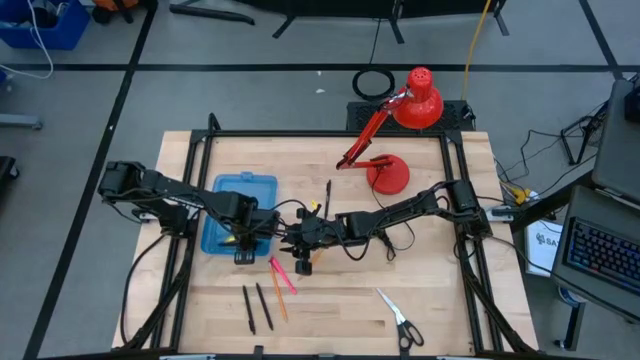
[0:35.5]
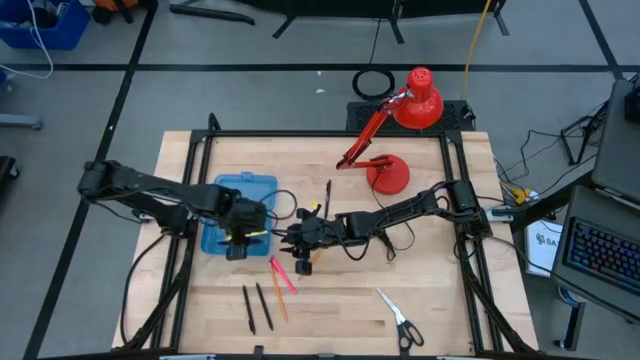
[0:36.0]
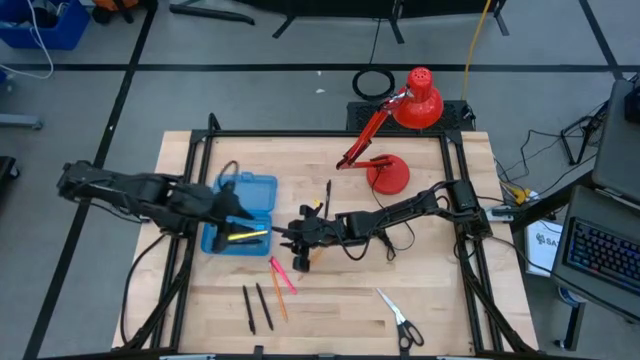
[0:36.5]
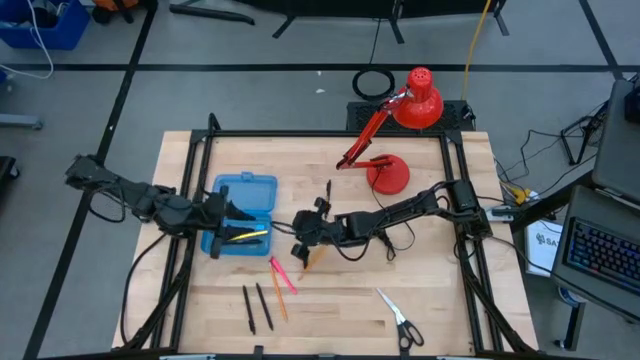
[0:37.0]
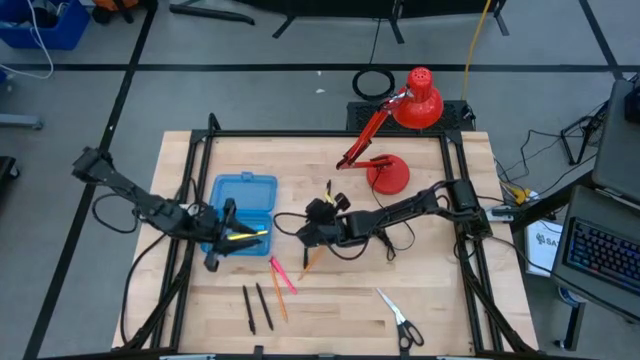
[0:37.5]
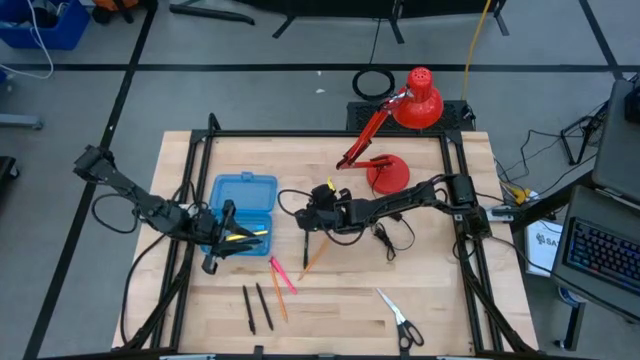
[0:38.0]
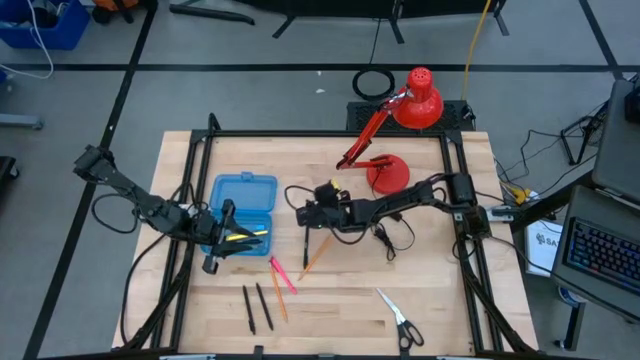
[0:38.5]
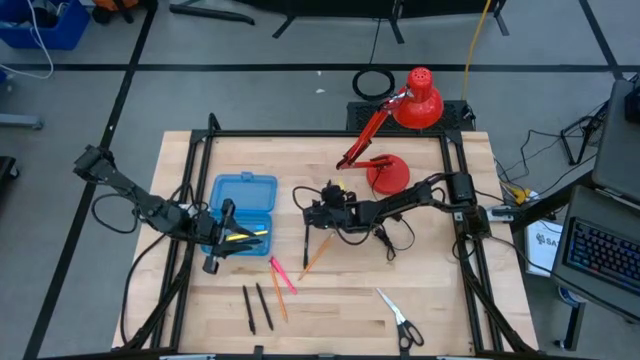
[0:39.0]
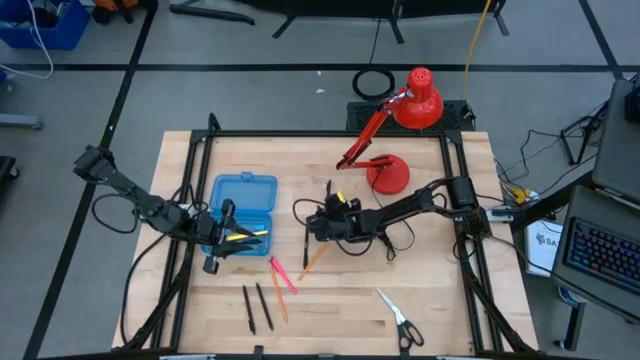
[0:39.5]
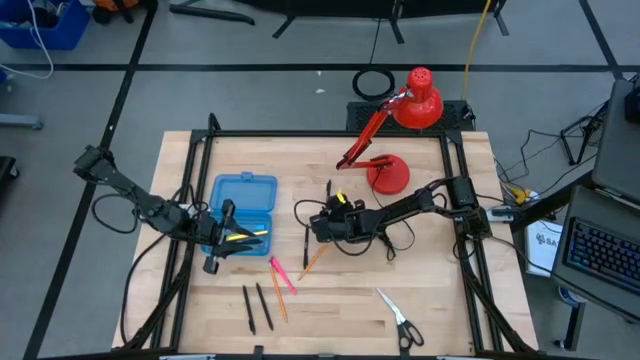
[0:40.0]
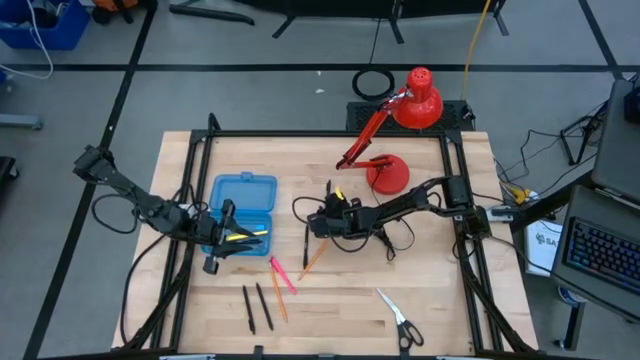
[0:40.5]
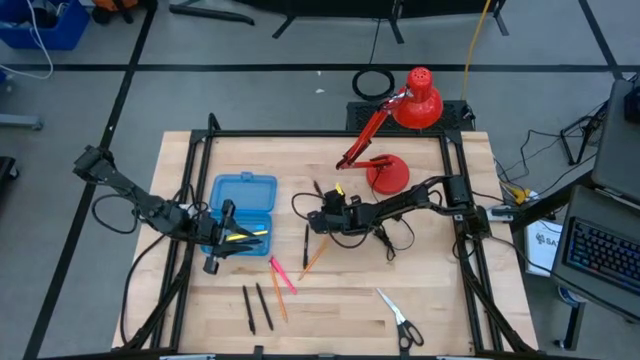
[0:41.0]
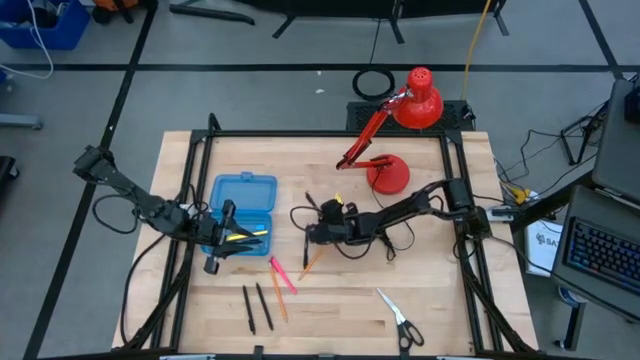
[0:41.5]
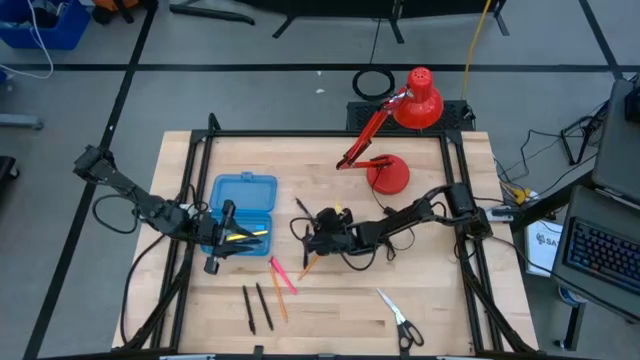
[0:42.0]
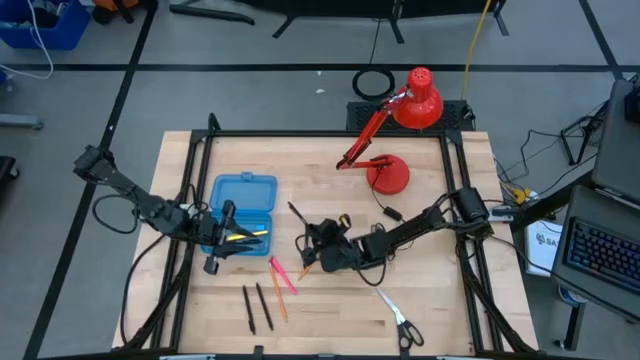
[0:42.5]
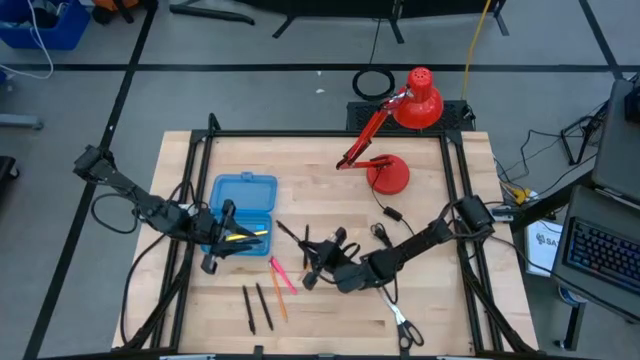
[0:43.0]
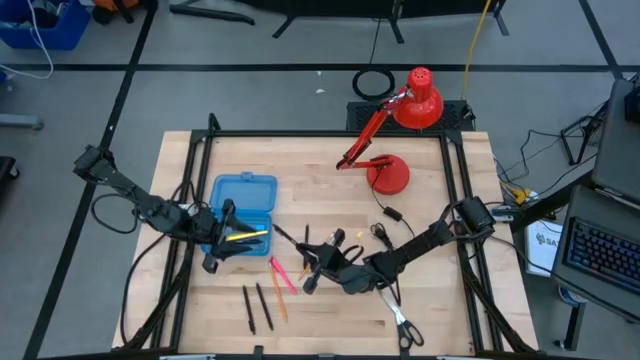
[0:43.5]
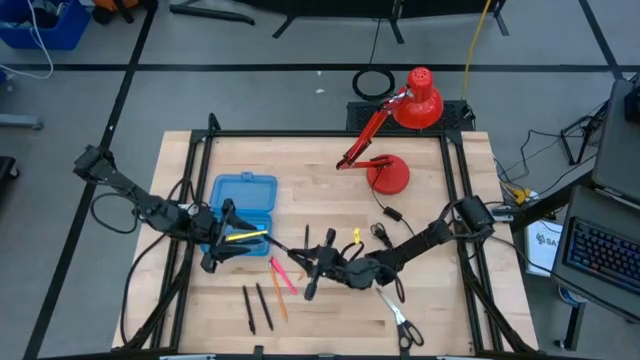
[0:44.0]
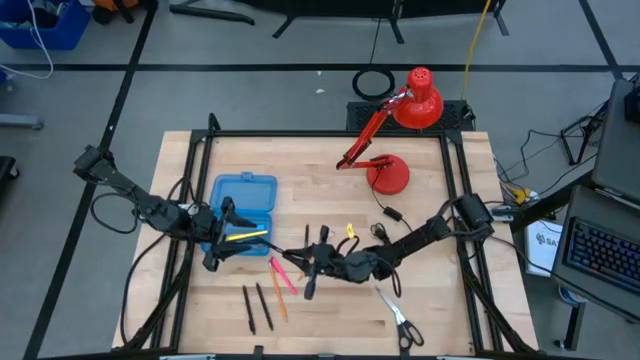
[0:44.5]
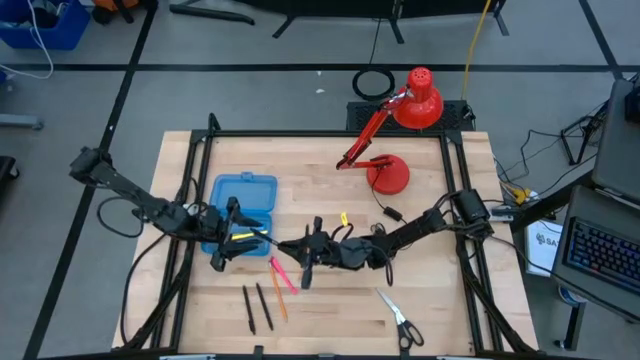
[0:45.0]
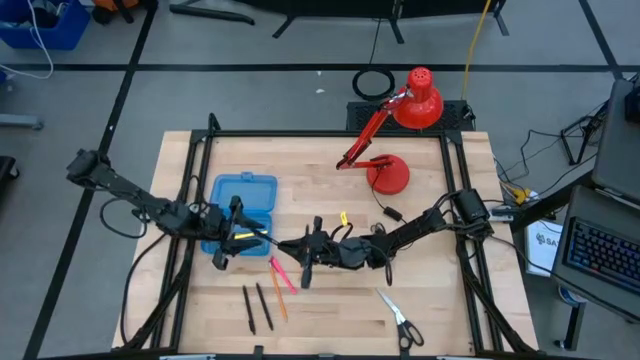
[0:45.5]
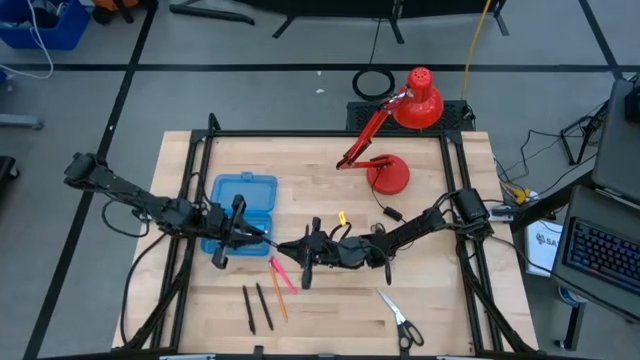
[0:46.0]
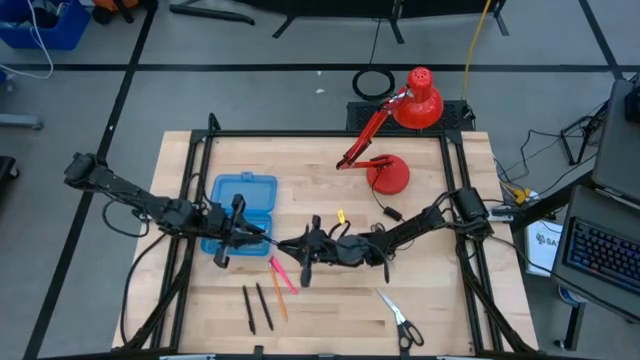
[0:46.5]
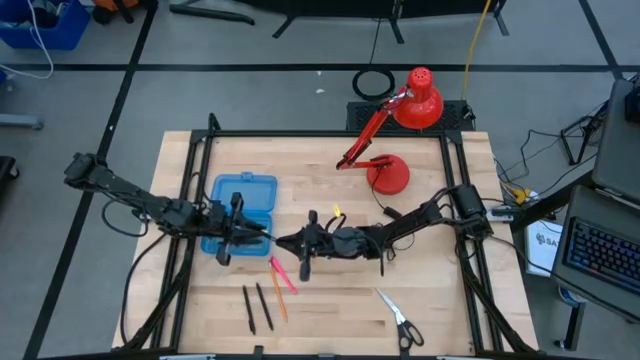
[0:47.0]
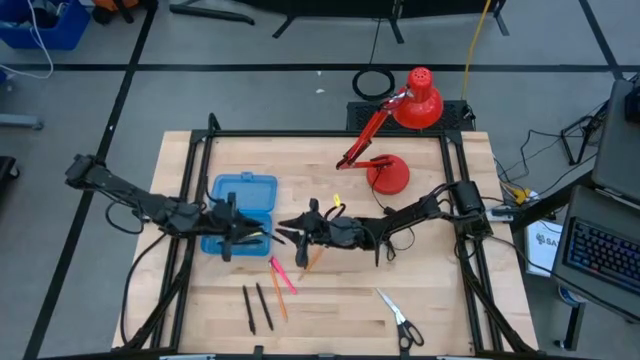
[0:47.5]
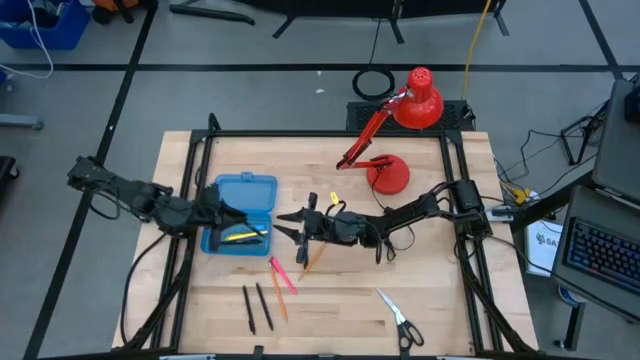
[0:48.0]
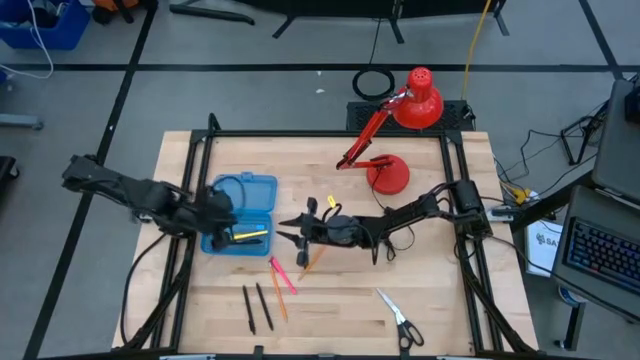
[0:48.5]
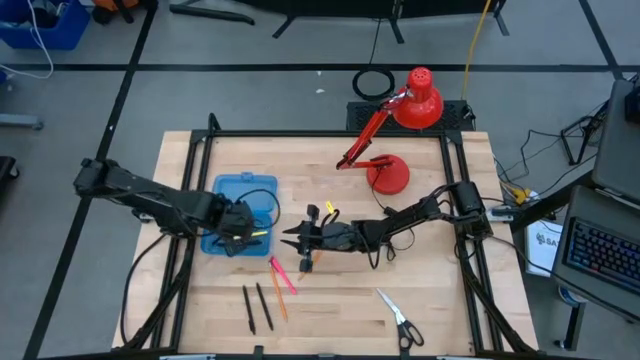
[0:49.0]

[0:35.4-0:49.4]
Task: Pick & place school supplies into a supply box
Put the black pen into the blue supply box

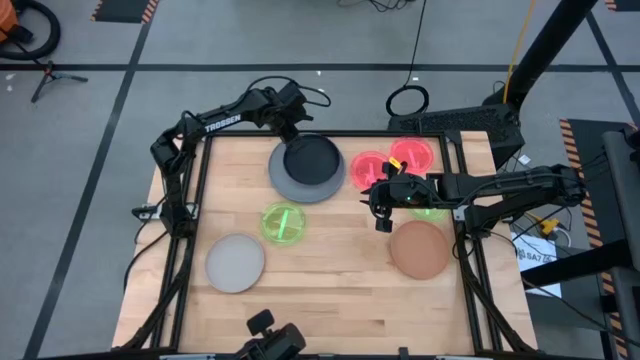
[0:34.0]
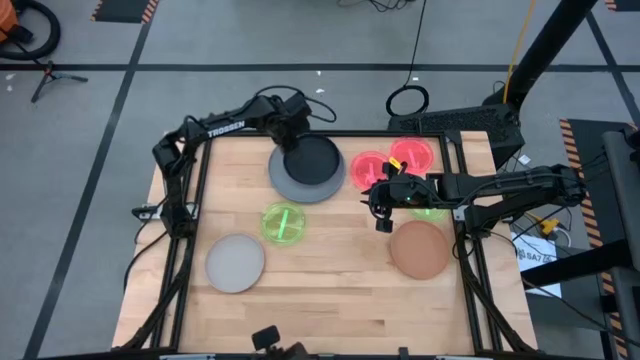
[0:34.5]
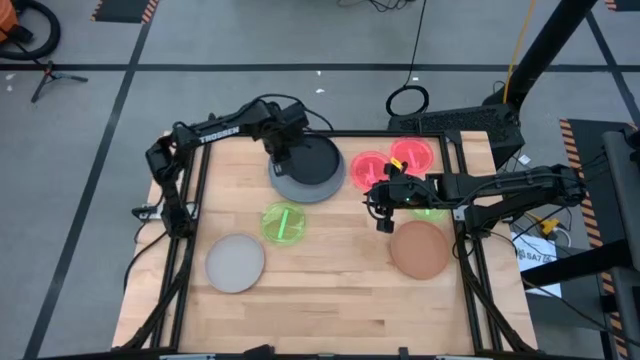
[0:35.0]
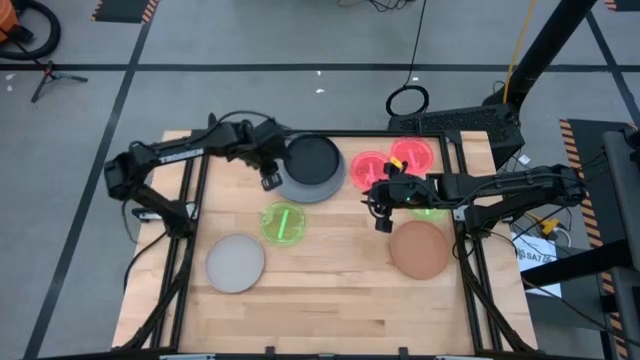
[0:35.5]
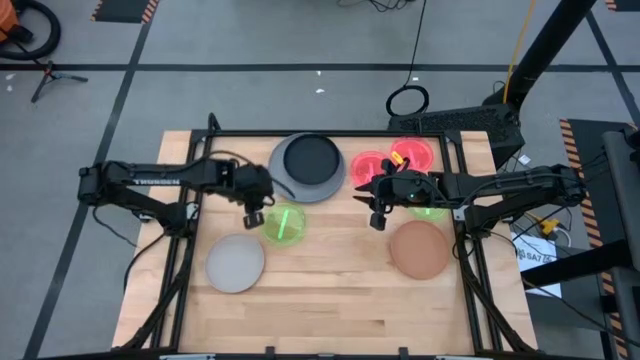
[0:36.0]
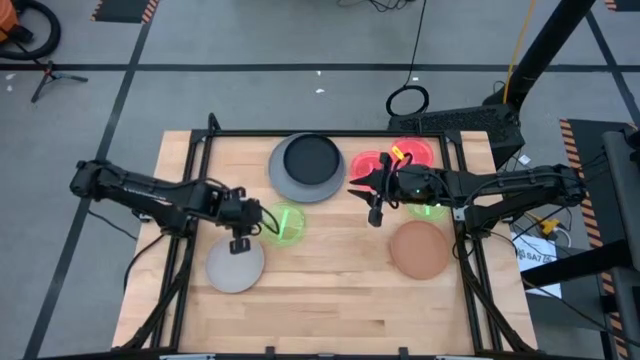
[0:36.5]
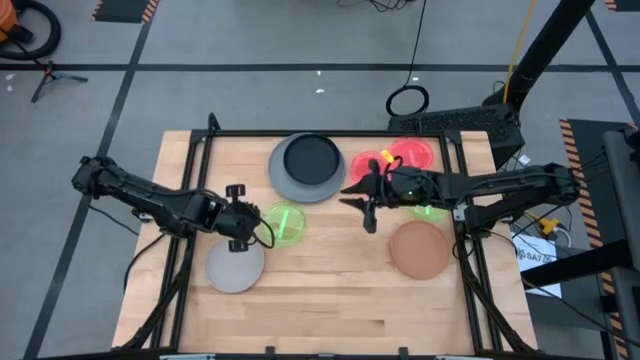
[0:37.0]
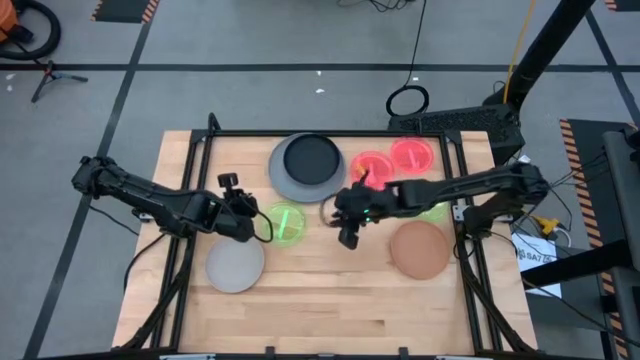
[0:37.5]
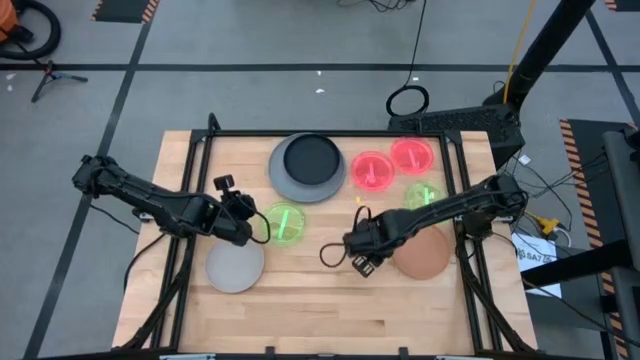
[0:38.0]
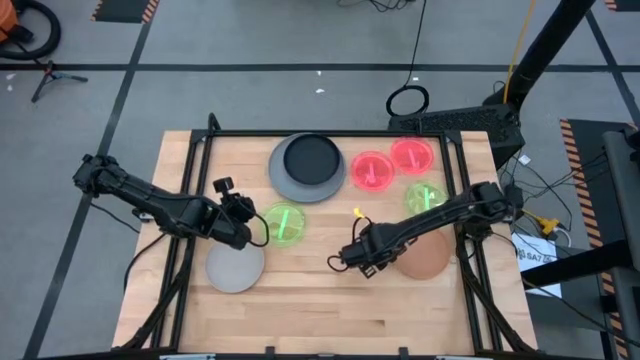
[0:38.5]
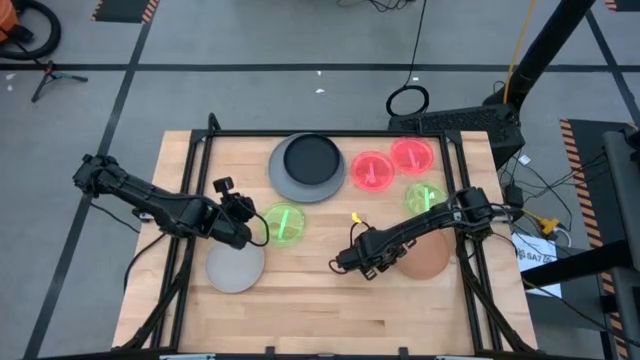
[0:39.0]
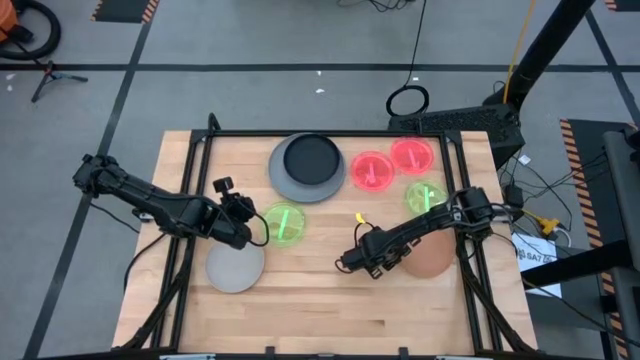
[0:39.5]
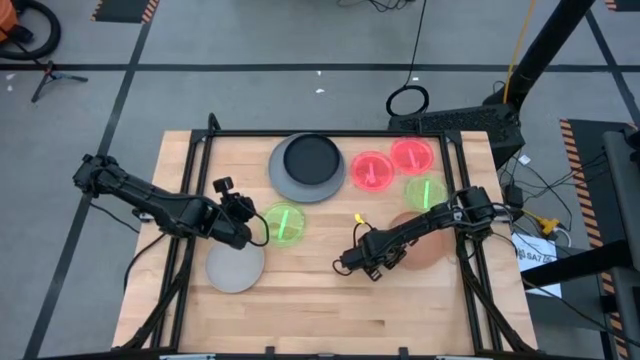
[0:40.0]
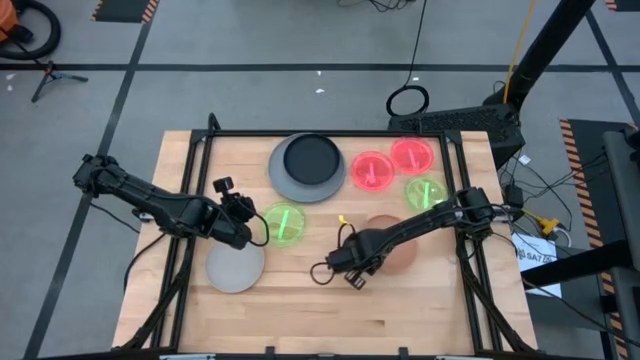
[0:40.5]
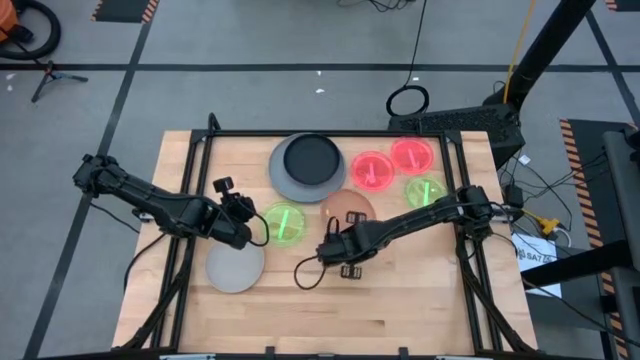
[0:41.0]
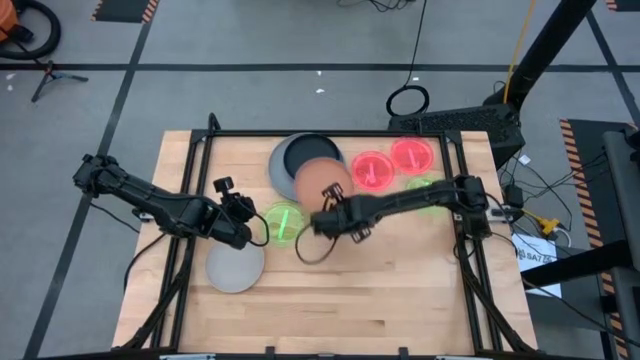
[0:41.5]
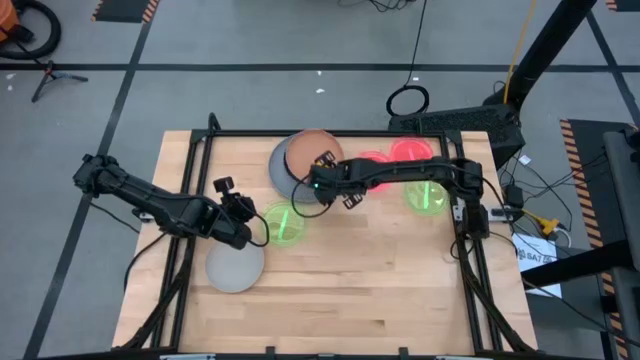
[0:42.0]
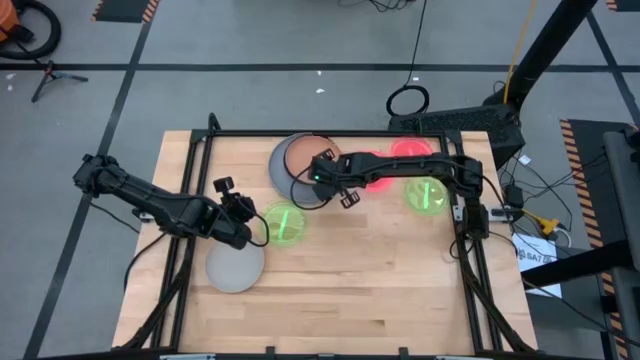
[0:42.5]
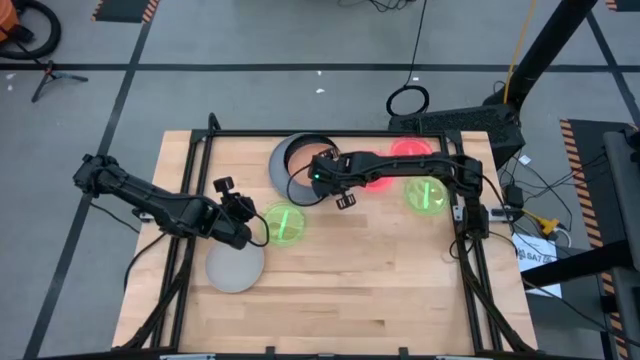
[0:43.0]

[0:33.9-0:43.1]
Task: Stack plastic plates
Stack the brown plate on top of the black plate
